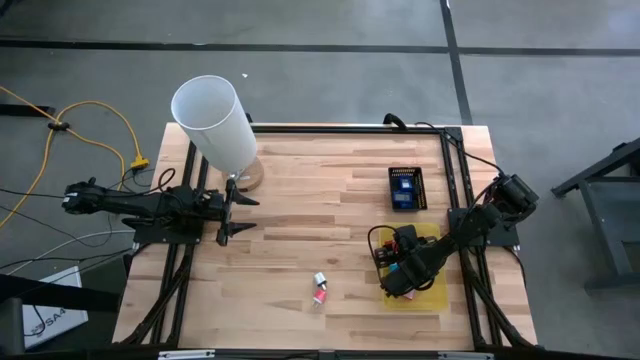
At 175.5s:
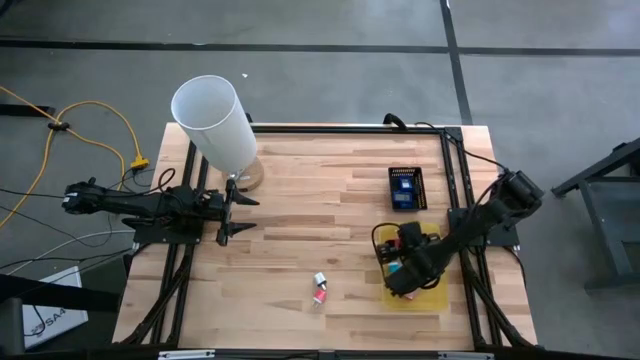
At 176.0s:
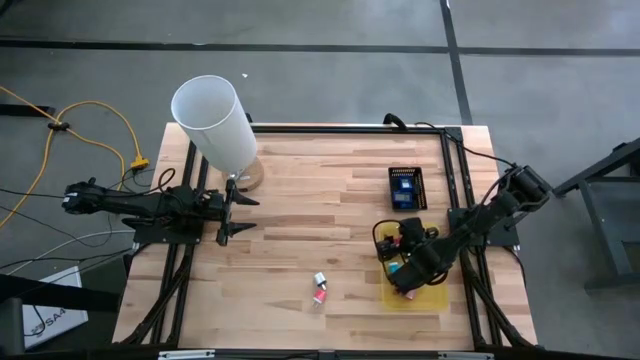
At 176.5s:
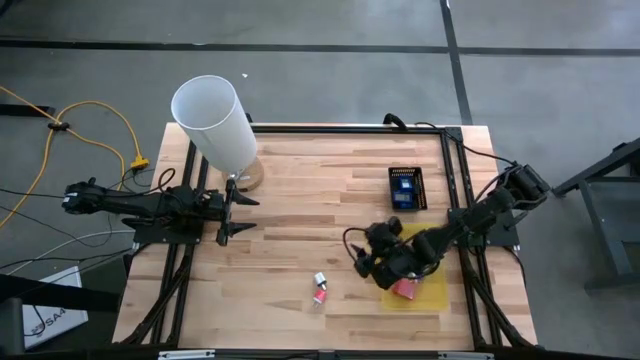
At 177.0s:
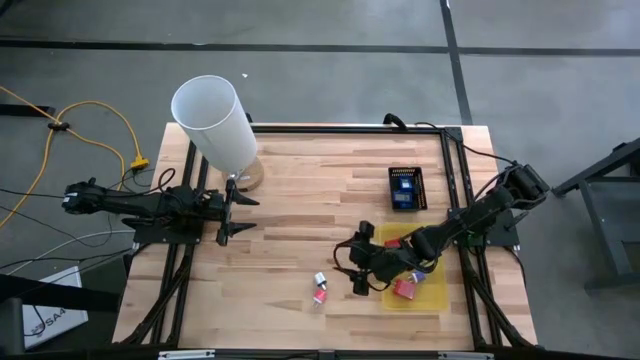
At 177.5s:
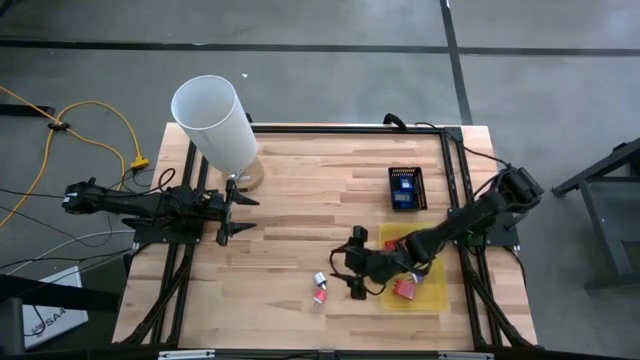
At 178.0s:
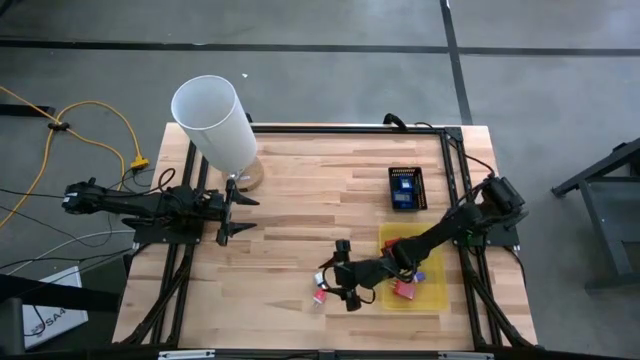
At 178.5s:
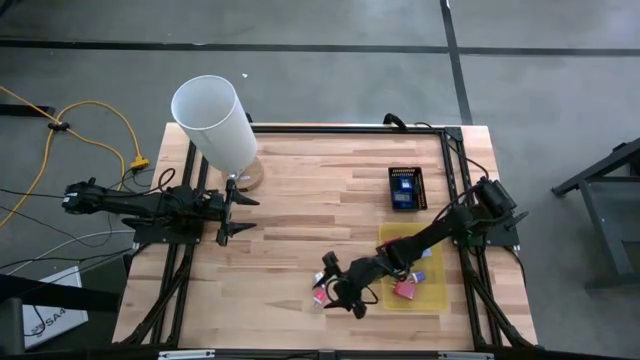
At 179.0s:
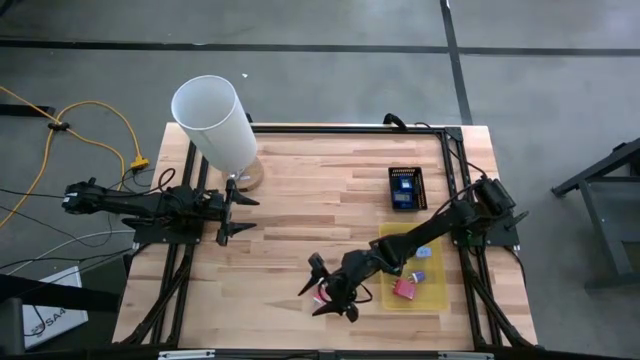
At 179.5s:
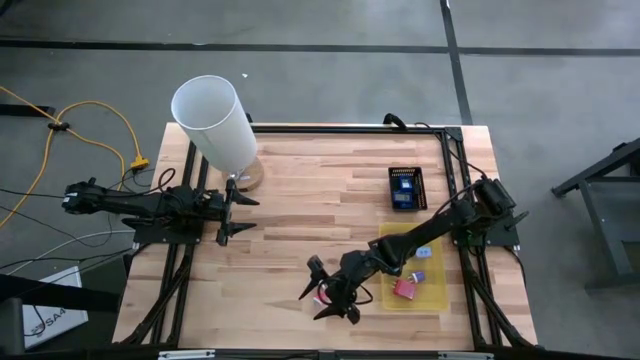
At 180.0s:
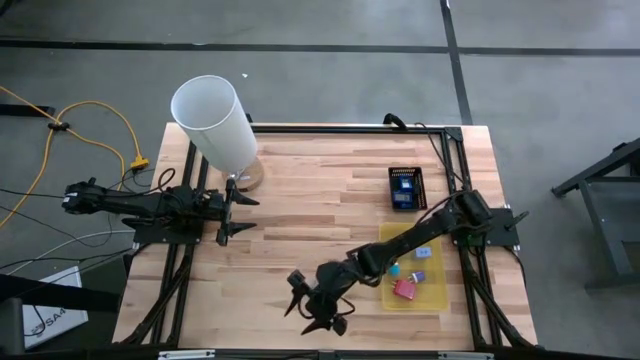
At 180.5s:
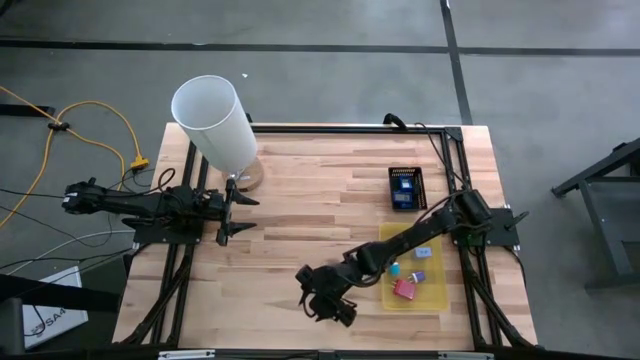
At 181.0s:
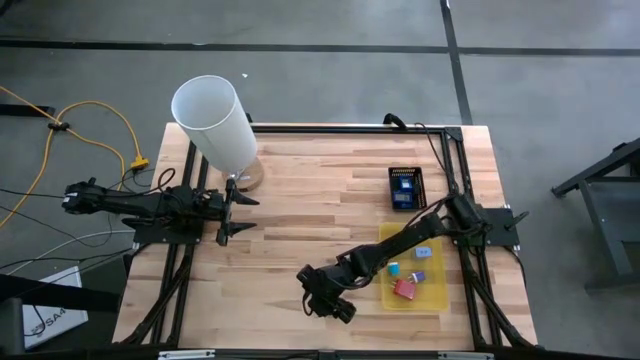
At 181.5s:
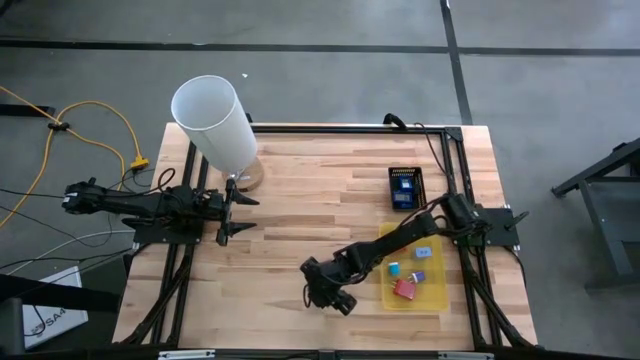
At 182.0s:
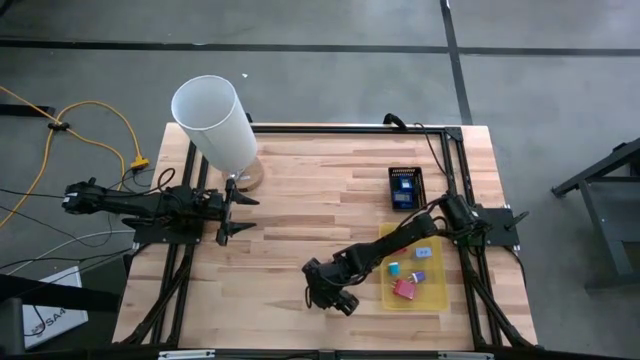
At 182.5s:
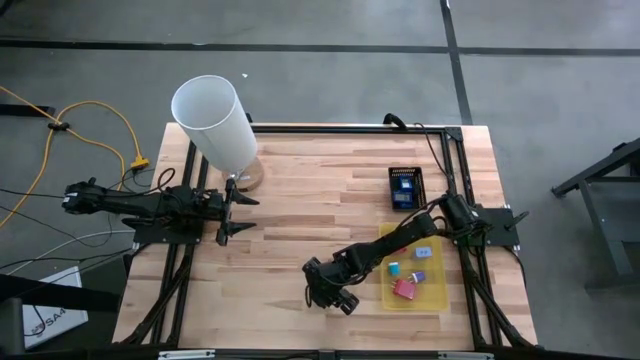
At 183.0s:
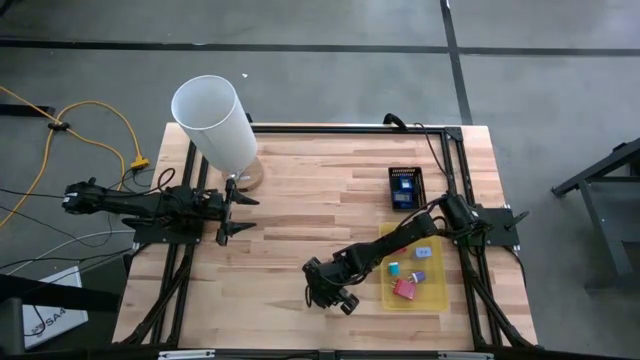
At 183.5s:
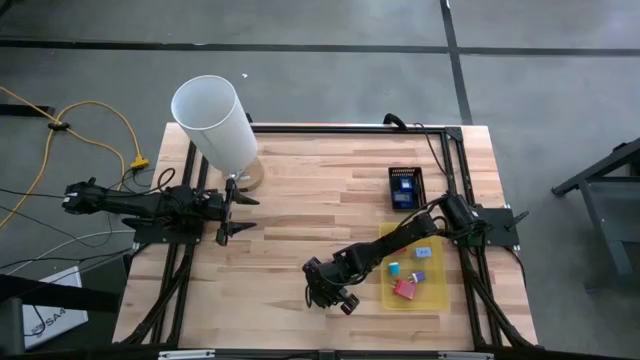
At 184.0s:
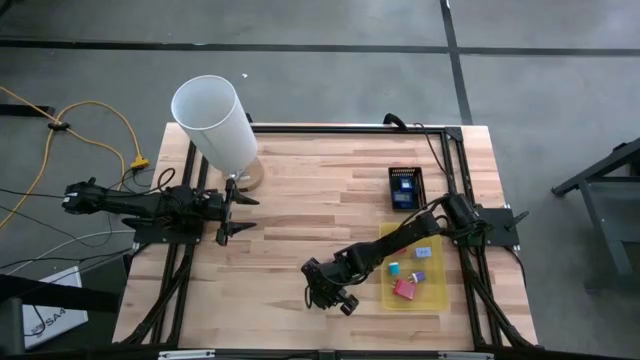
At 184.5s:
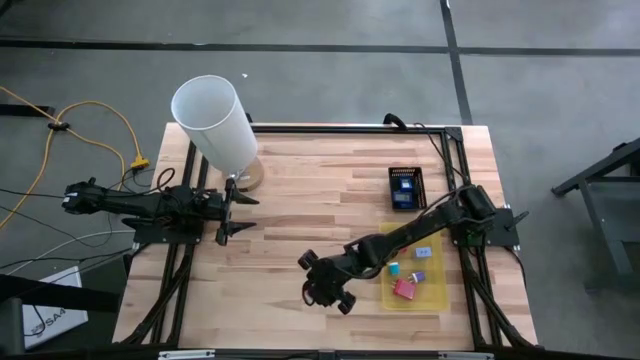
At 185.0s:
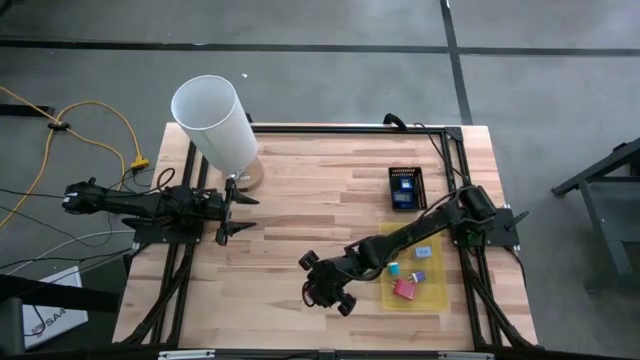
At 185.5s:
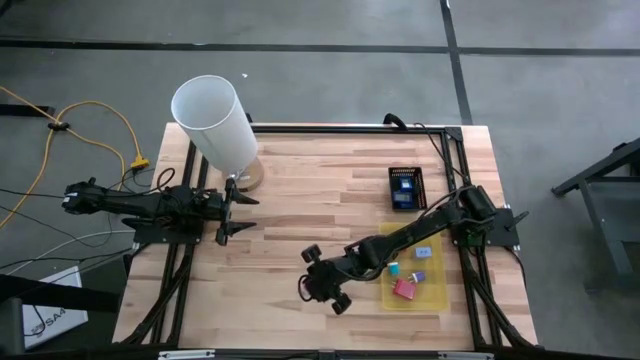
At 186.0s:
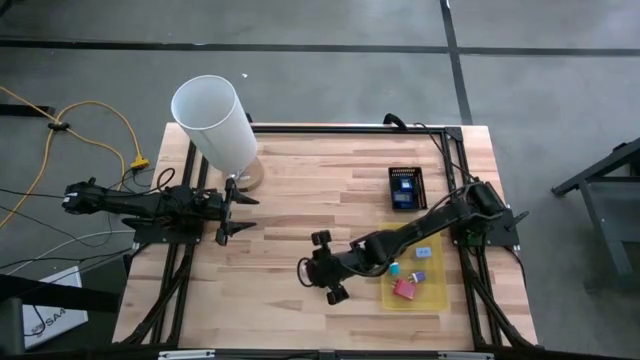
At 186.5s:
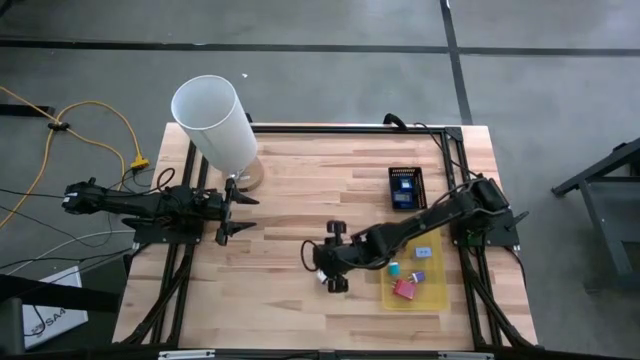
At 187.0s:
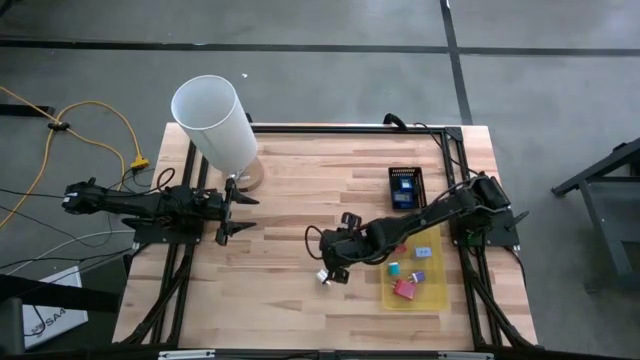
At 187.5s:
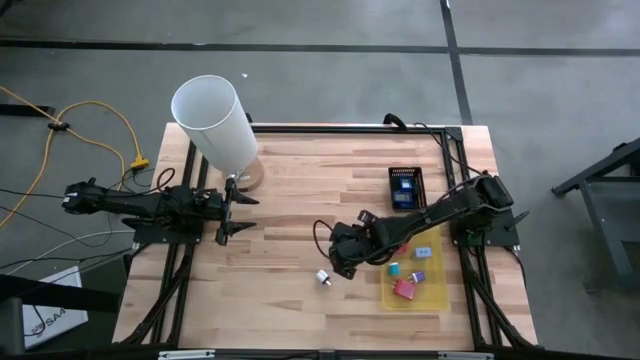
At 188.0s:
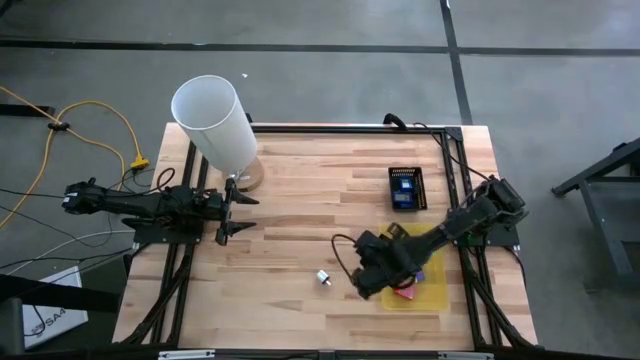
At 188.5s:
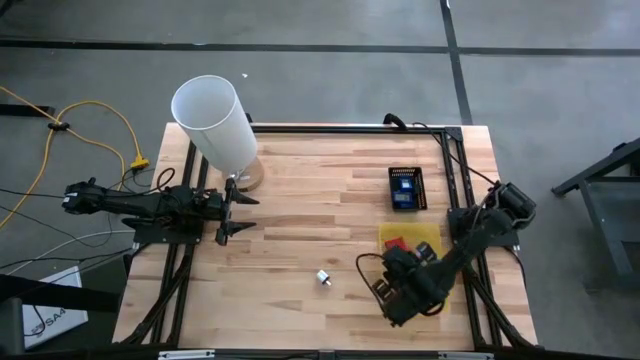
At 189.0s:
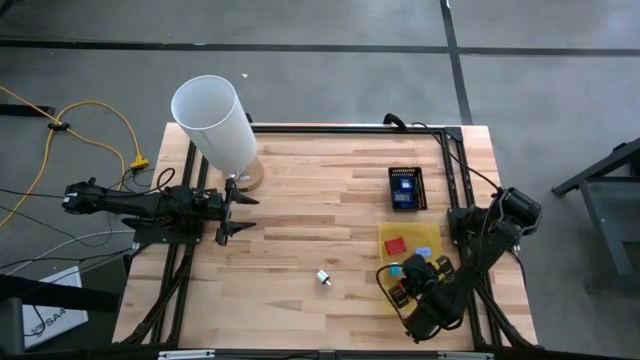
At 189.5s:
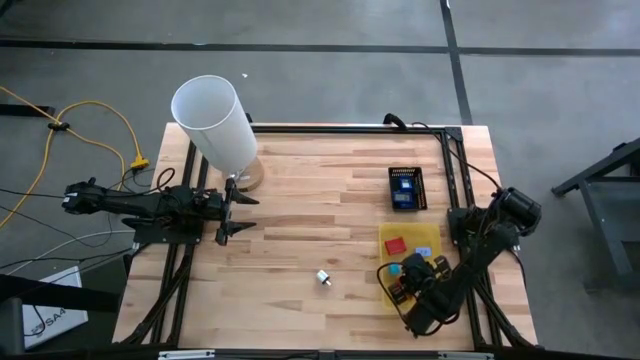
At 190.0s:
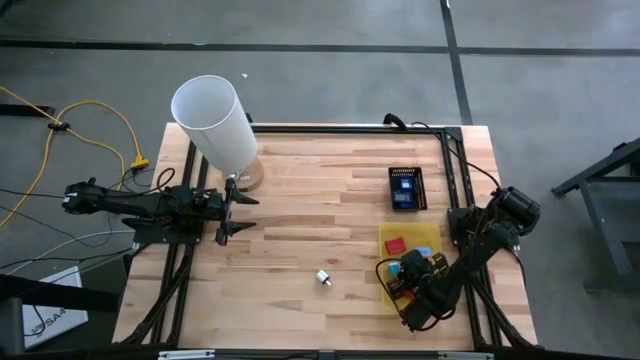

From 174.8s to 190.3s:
Task: Pick & Place Office items
Put the pink charger adapter into the yellow bin

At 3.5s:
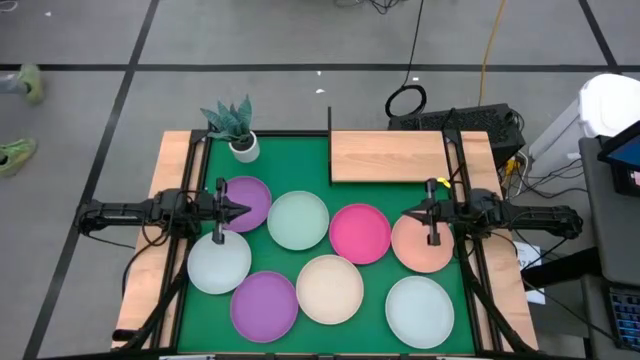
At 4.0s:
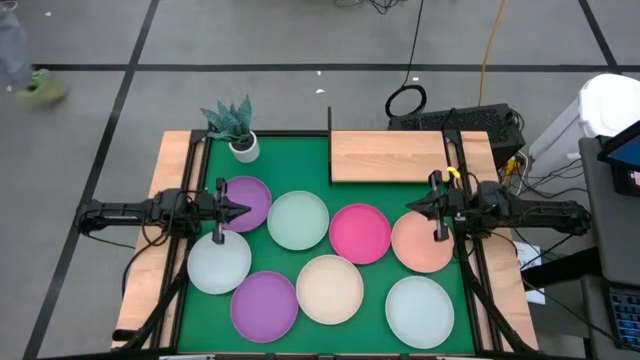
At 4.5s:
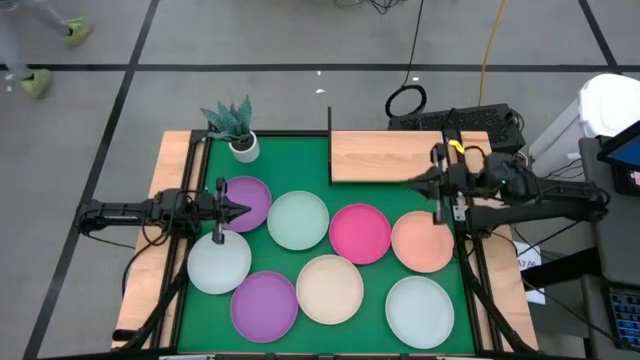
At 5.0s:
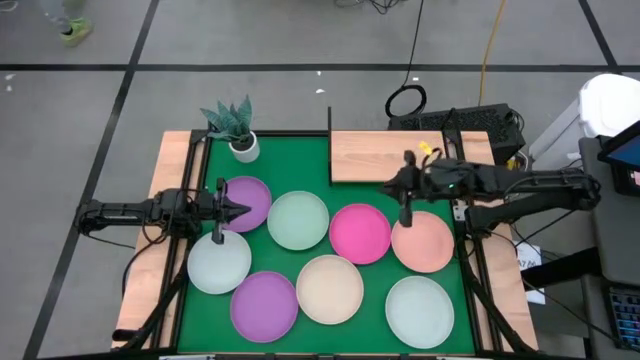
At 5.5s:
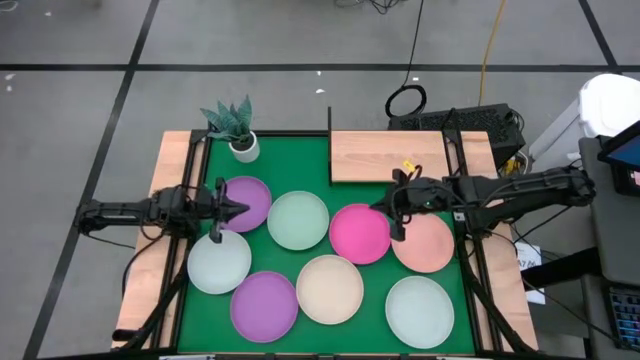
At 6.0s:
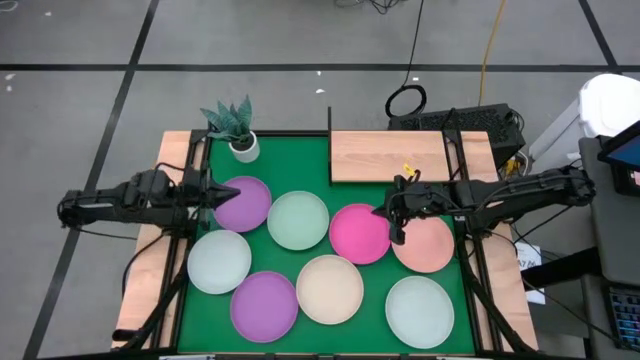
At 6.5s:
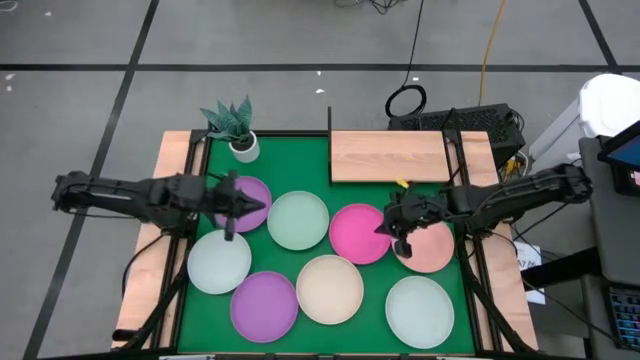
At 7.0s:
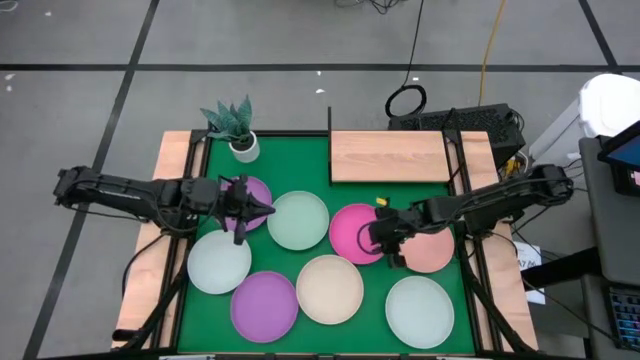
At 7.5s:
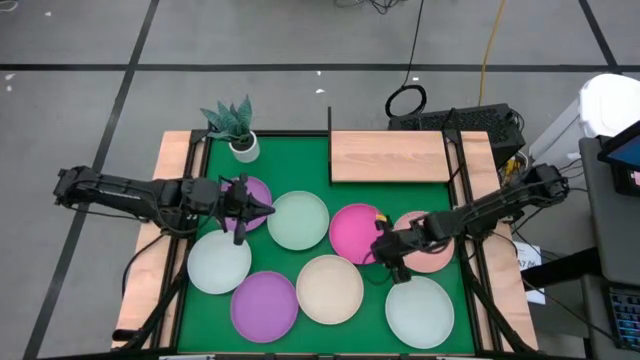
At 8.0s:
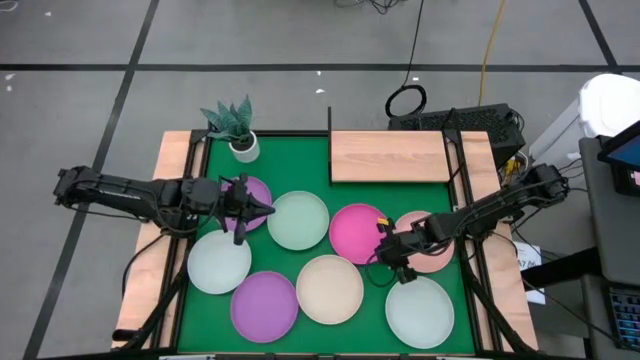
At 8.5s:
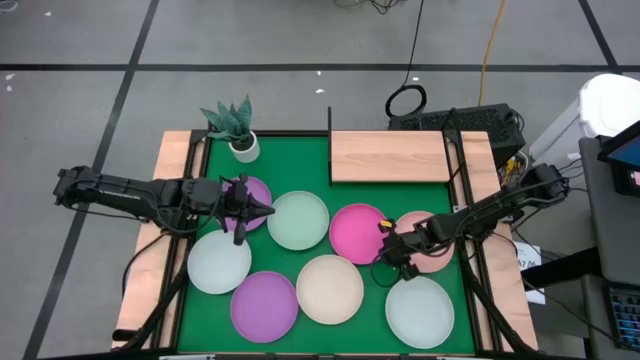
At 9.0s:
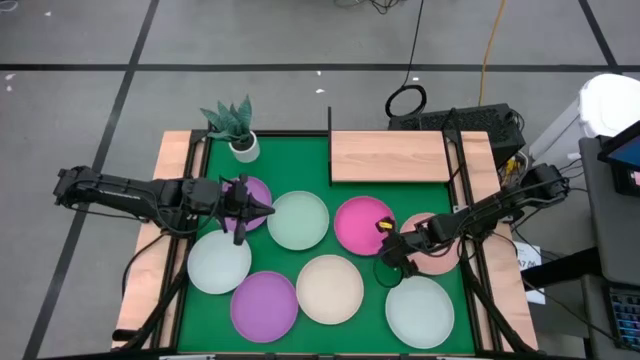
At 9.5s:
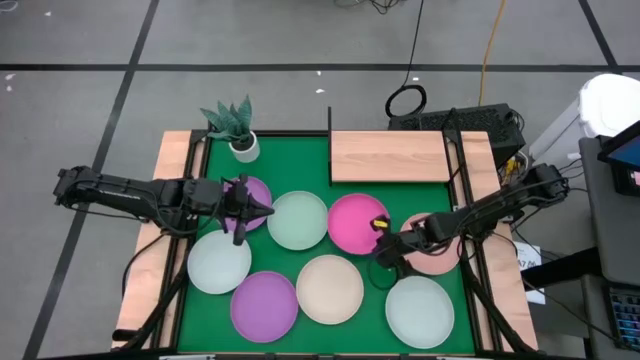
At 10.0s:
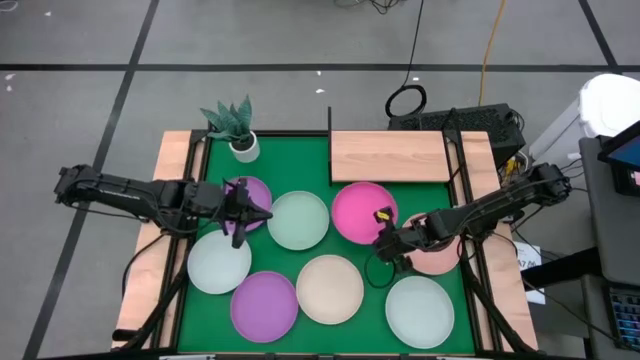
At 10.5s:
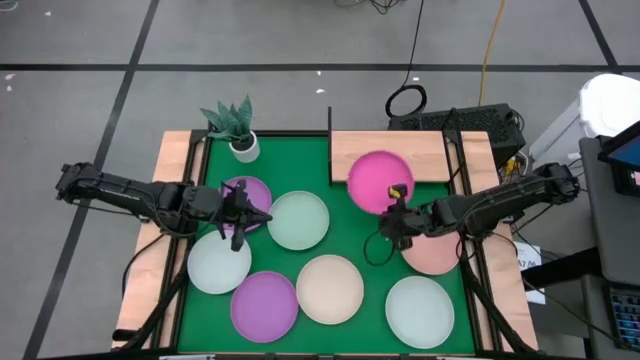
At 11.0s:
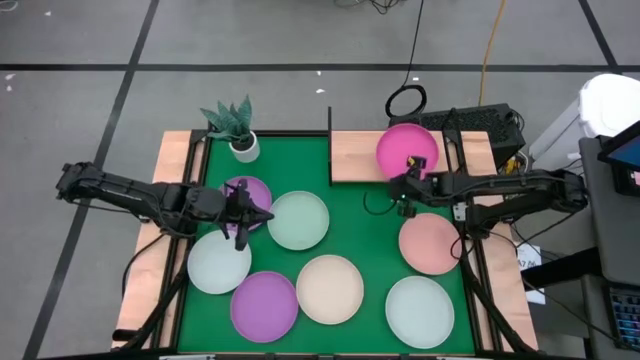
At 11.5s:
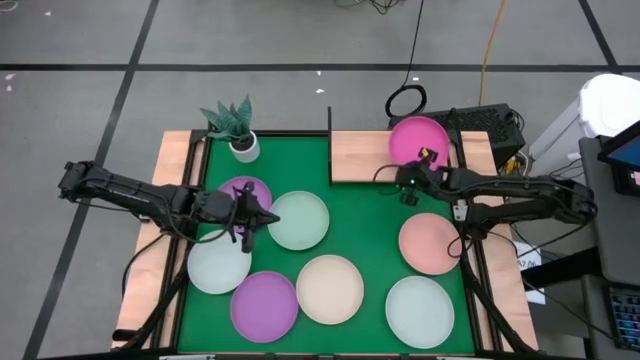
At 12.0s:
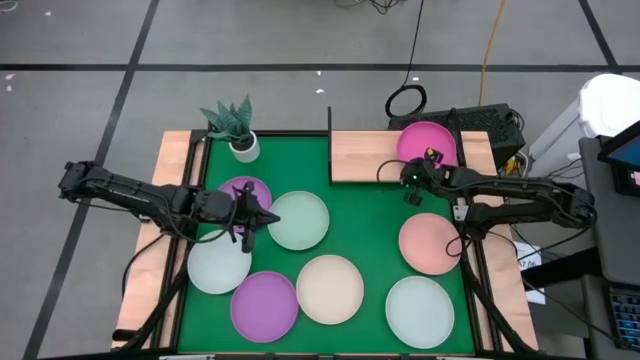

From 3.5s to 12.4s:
Task: Place and stack plates onto a shelf
Put the light red plate on the shelf
